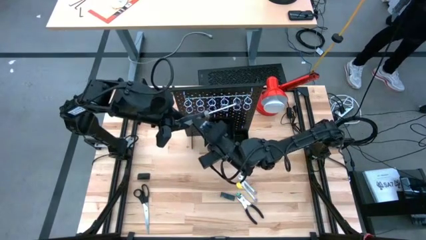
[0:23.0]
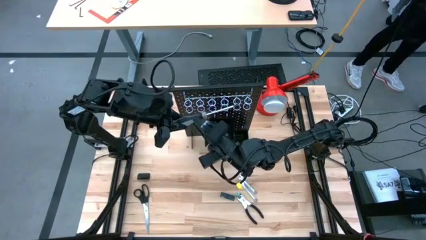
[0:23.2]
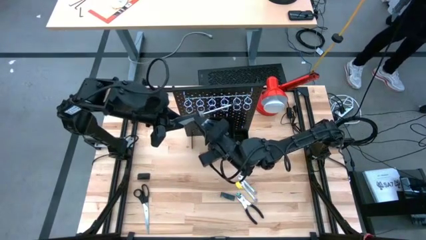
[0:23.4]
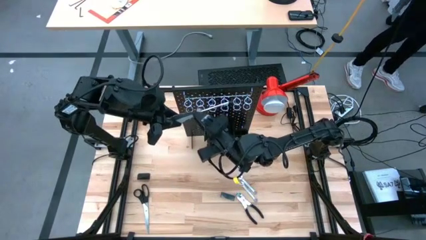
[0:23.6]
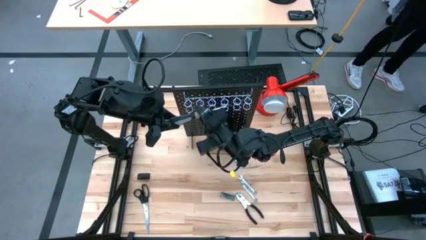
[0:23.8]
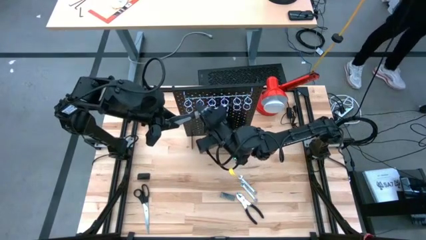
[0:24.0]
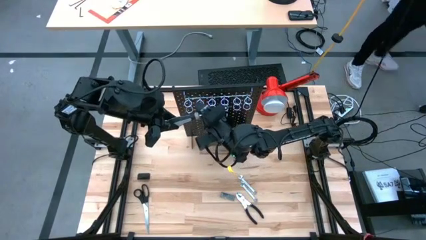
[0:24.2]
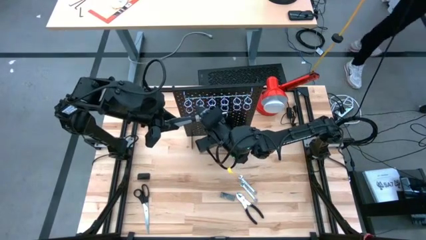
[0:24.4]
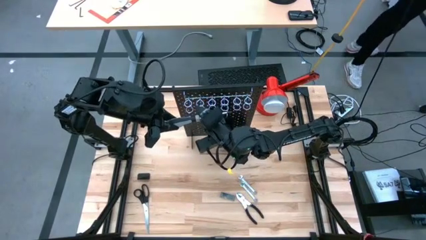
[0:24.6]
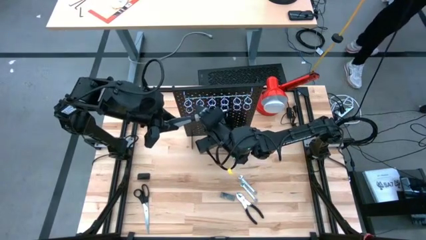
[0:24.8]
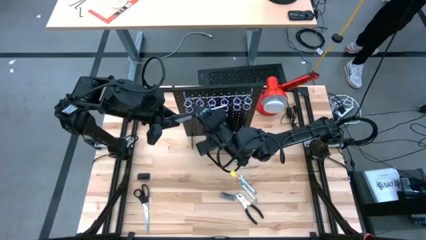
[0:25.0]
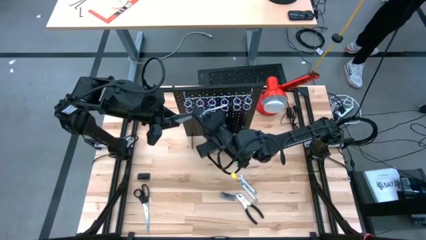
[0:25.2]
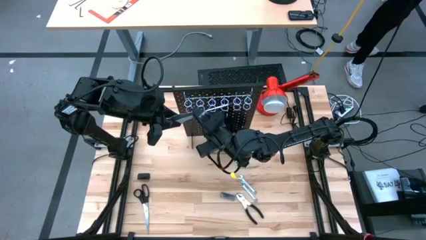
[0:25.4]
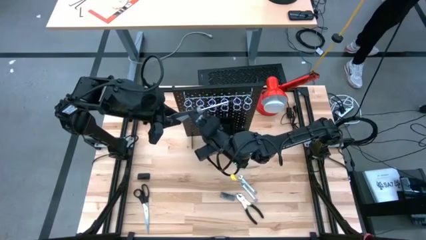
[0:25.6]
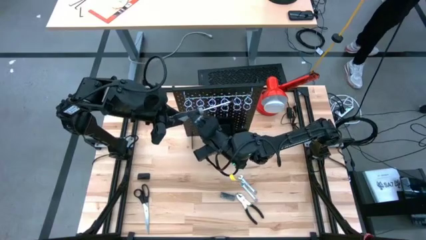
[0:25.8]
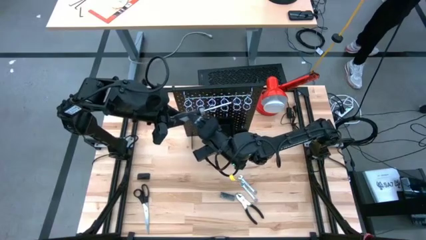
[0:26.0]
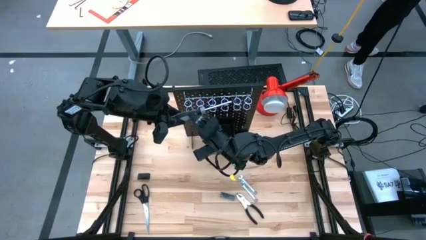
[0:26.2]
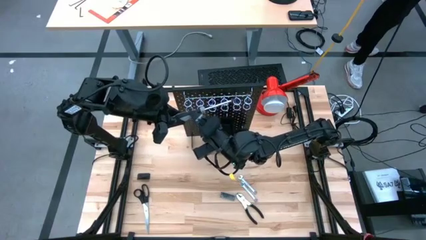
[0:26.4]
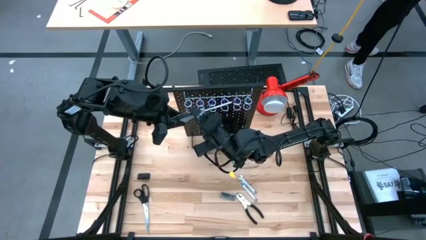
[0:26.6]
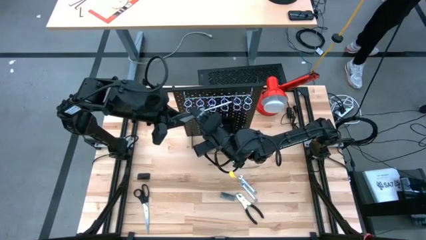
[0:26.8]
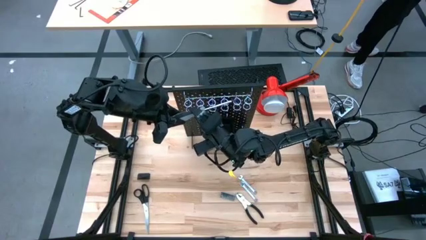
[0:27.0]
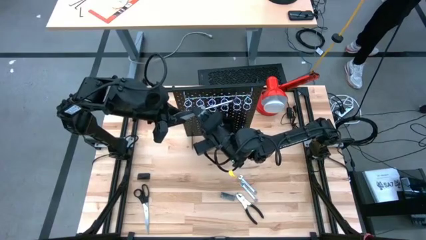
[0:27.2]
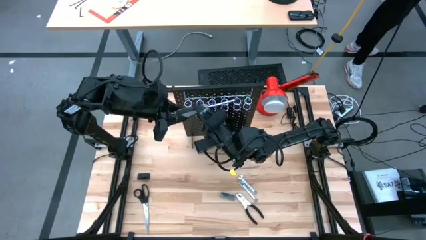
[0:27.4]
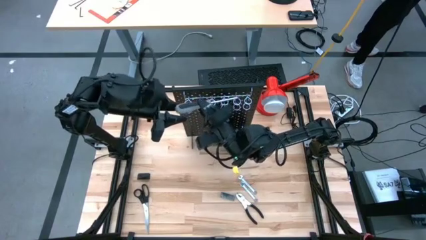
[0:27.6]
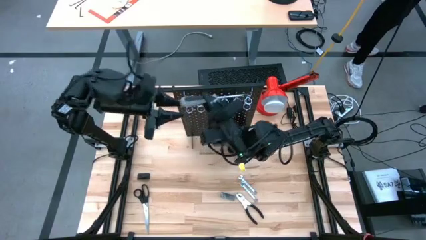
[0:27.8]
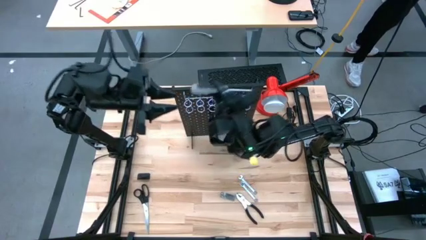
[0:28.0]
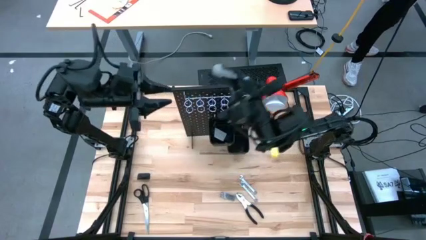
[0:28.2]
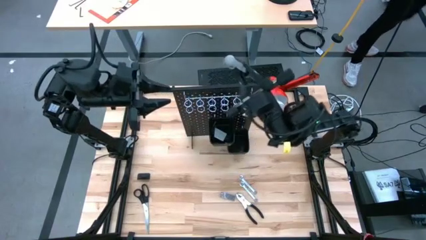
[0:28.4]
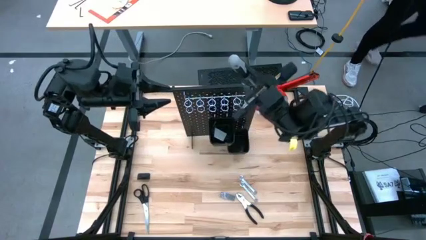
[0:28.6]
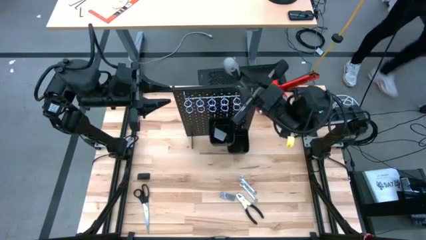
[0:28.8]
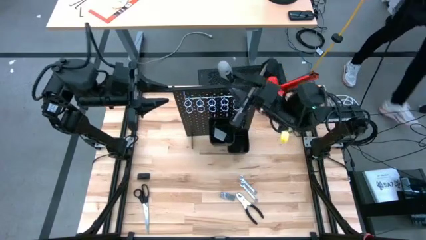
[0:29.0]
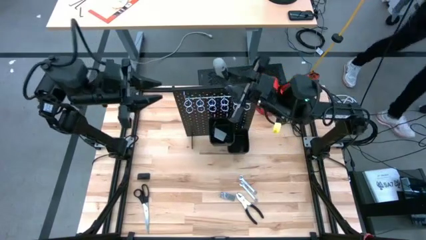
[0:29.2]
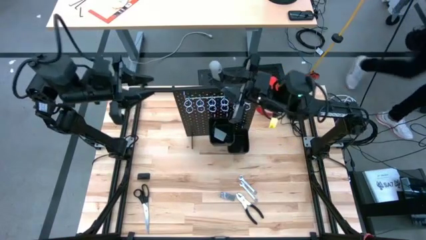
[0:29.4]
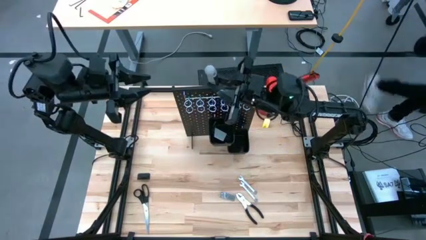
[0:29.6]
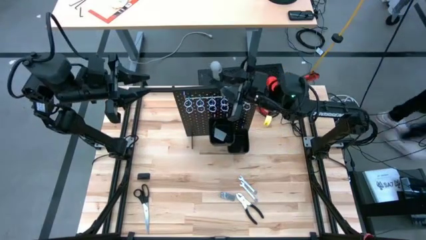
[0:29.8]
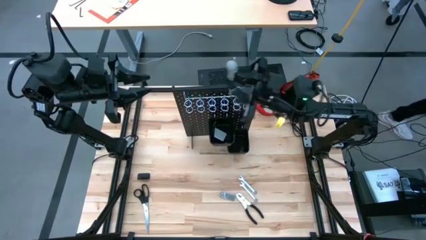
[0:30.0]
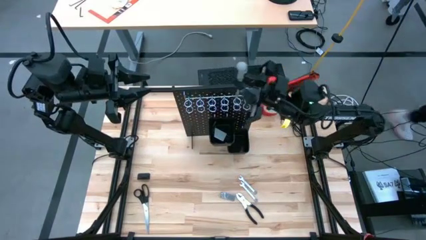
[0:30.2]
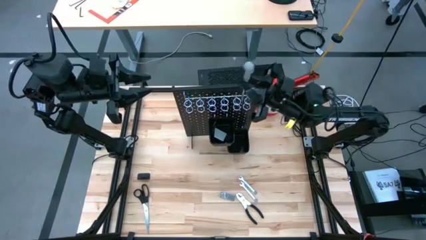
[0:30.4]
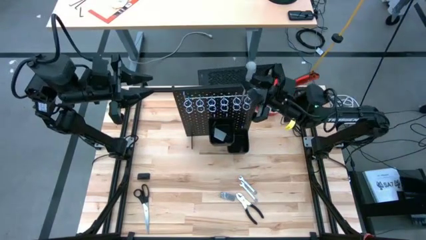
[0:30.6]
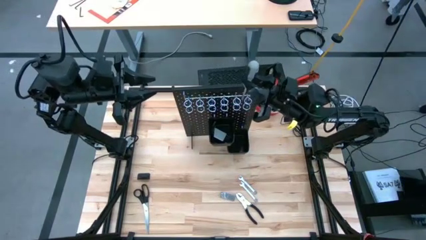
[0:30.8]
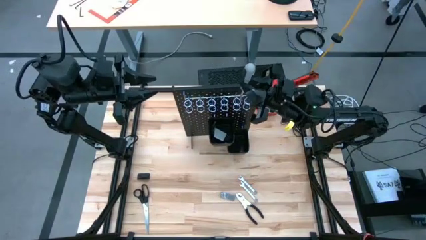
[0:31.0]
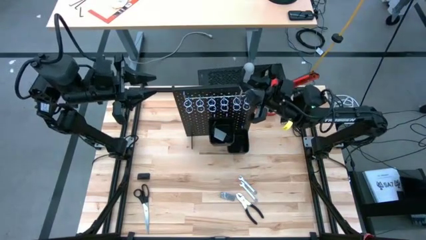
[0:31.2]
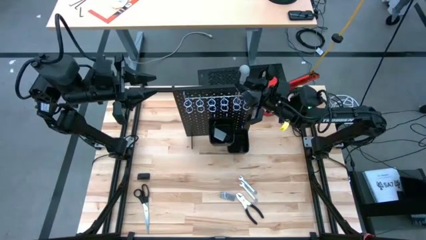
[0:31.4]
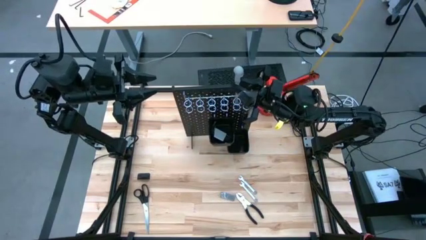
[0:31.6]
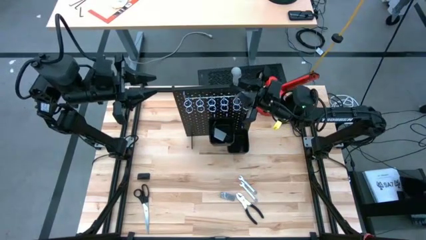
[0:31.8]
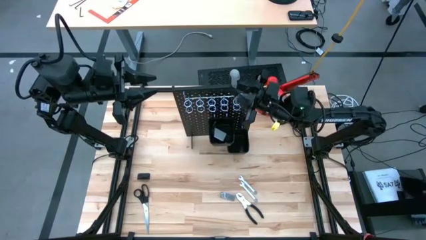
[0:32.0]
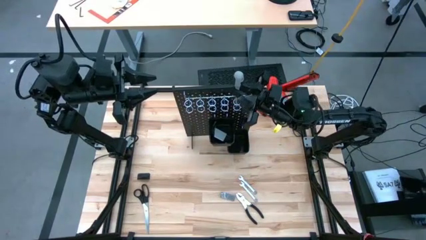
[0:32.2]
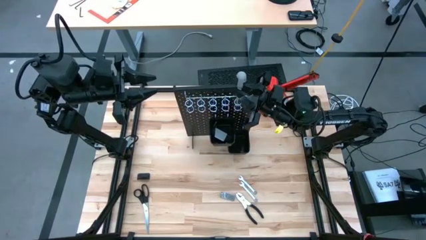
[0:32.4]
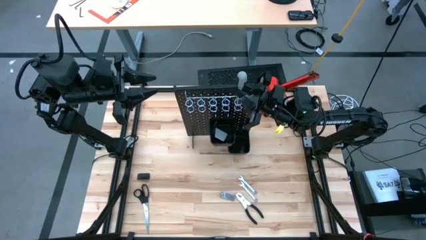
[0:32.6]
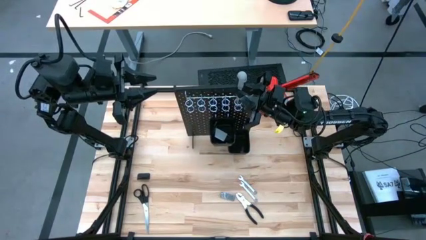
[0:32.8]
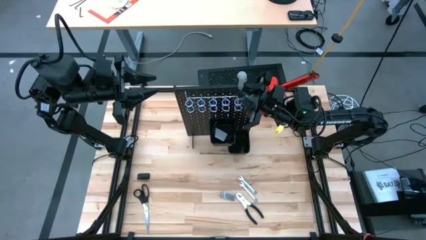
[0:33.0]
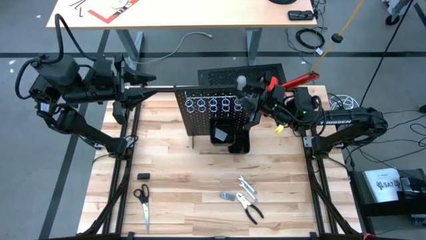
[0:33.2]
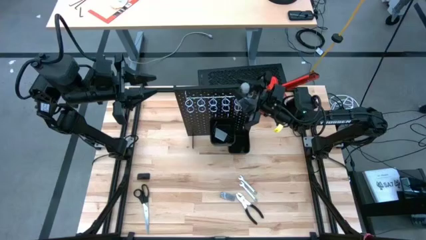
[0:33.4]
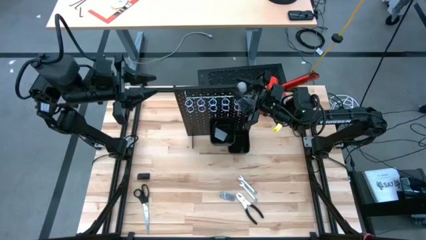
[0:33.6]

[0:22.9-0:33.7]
Task: Hang tools onto peg board
Hang the screwdriver on the pegboard

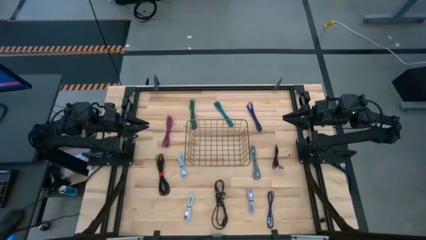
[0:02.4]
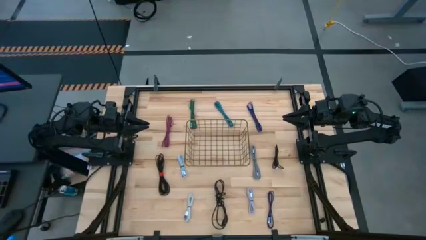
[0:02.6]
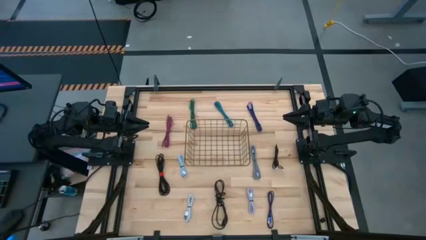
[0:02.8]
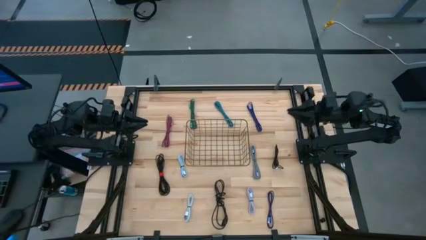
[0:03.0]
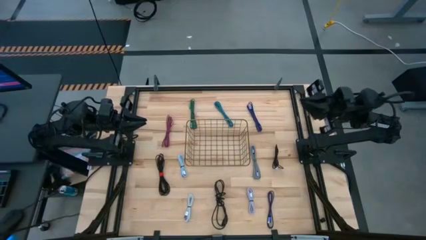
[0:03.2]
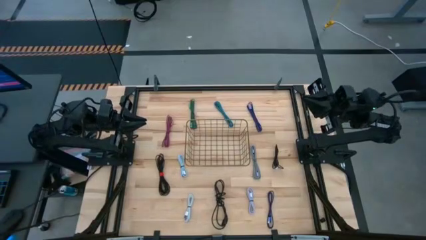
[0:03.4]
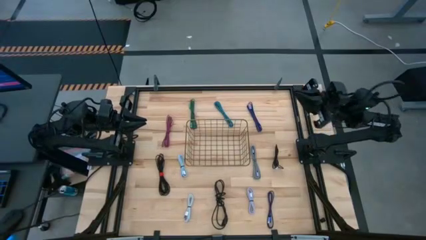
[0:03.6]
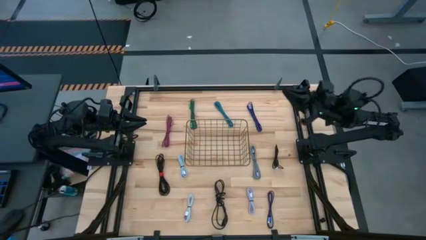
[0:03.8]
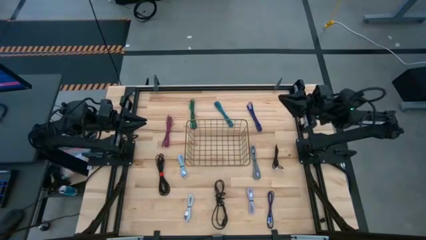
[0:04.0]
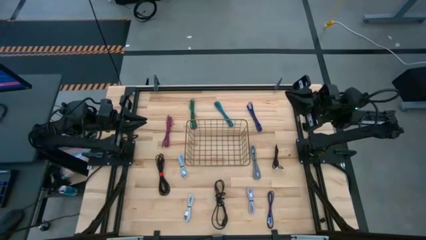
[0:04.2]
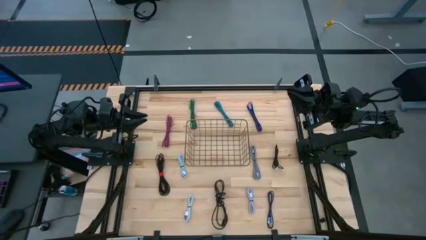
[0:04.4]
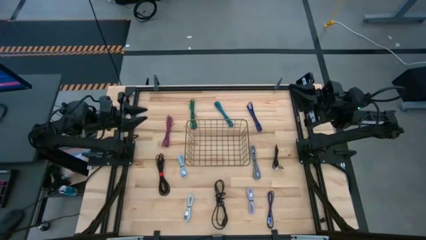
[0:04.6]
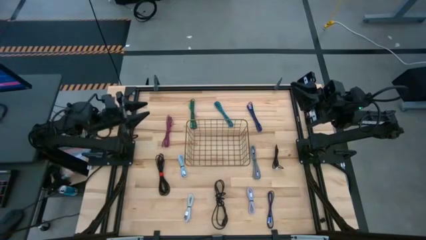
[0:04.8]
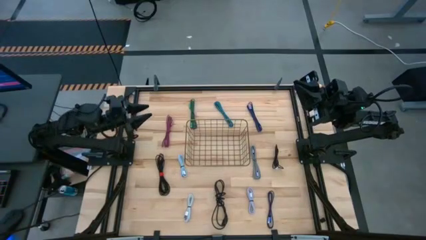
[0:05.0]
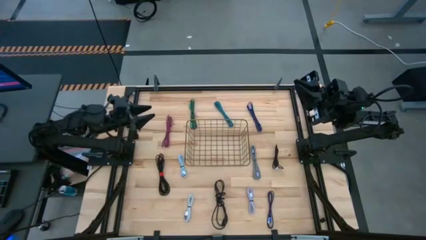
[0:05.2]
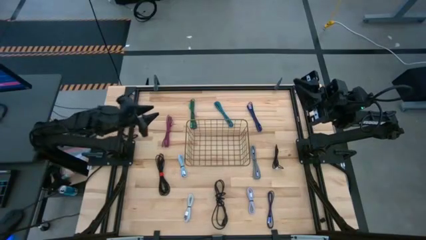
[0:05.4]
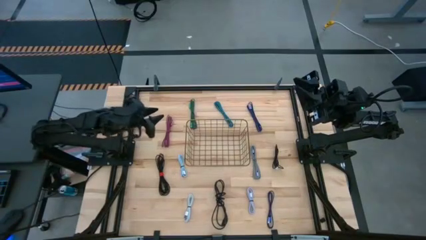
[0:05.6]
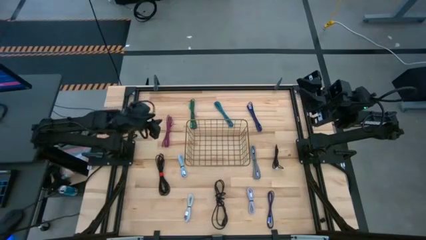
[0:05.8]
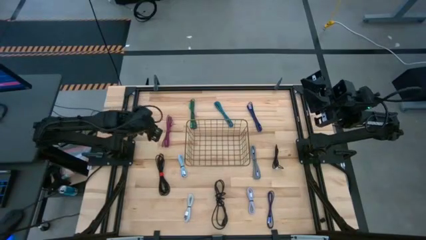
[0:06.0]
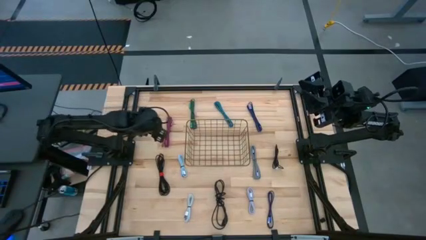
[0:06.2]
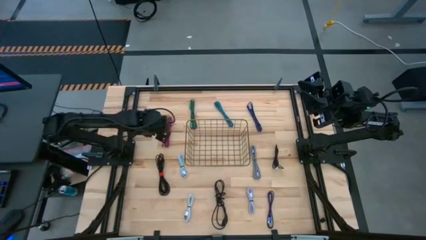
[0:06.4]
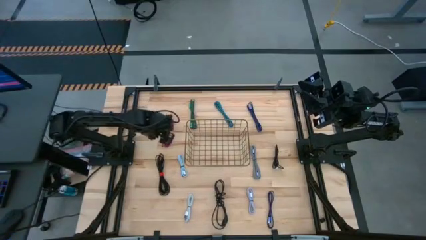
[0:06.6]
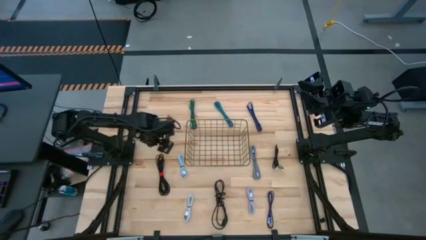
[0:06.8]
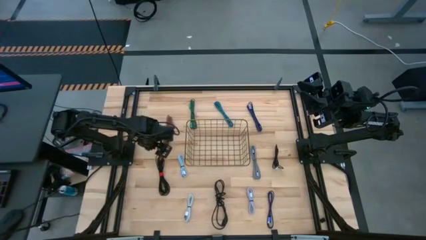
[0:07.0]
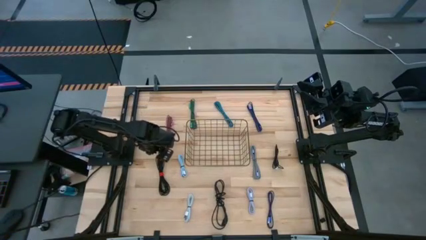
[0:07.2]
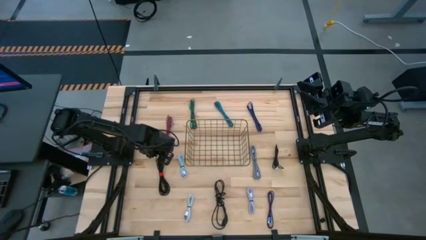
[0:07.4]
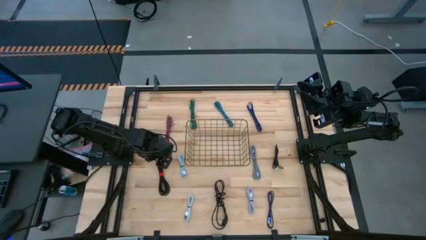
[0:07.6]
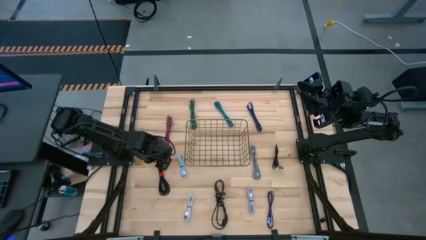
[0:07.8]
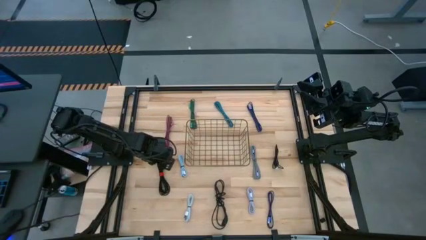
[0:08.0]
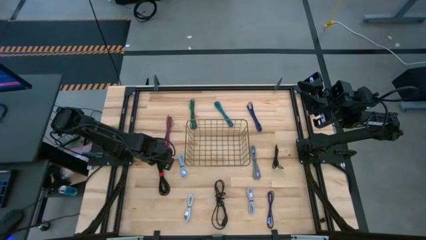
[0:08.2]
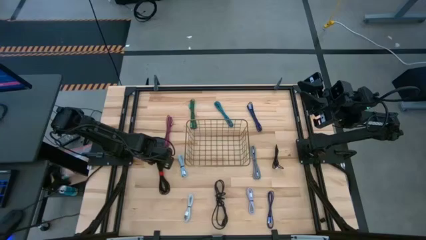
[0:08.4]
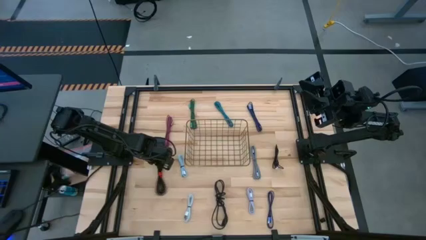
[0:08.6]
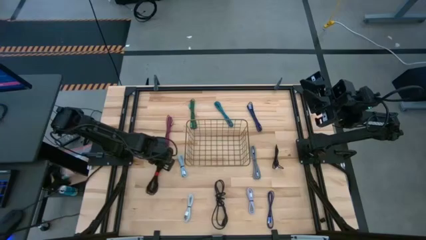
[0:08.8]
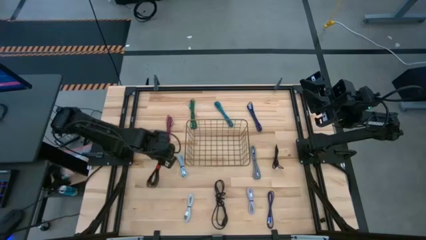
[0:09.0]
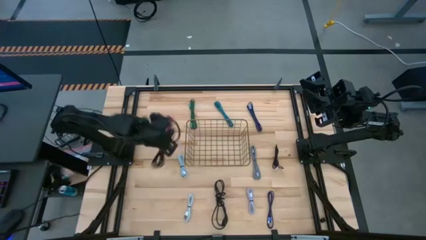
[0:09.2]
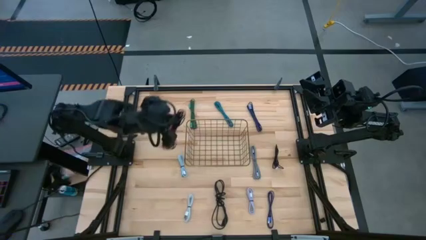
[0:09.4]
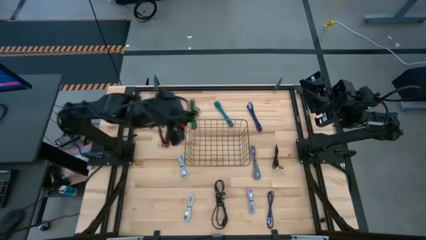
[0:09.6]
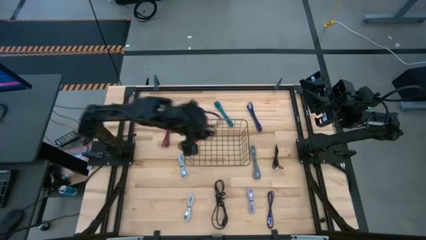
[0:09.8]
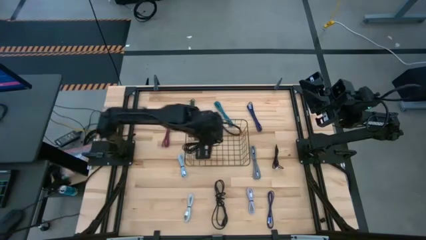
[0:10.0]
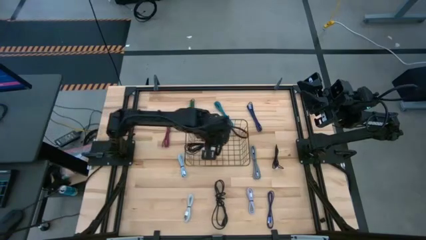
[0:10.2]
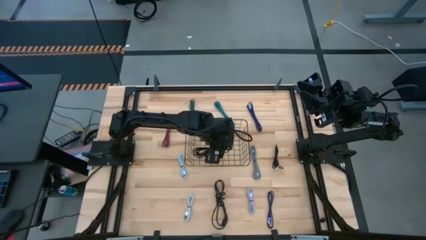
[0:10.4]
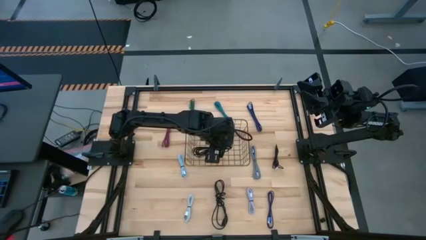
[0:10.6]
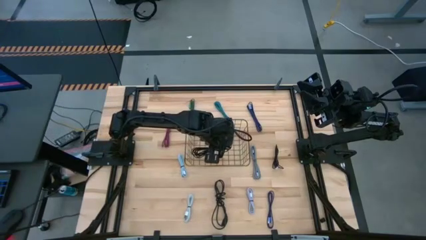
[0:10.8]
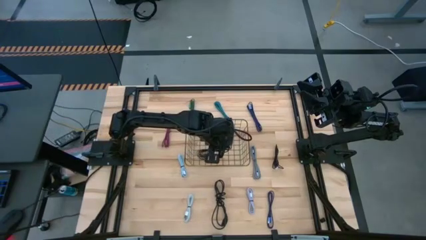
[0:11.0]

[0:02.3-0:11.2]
Task: Pick and place USB-C Cables
Put the top left black USB cable into the gold wire basket
